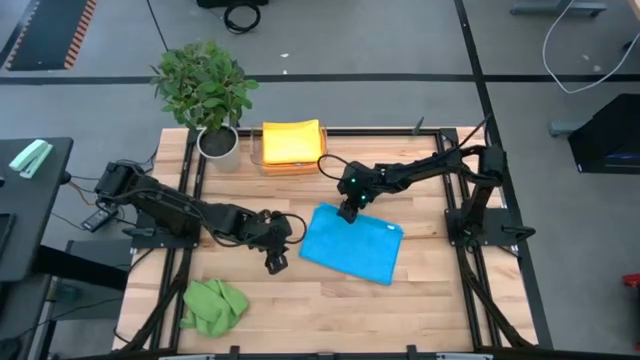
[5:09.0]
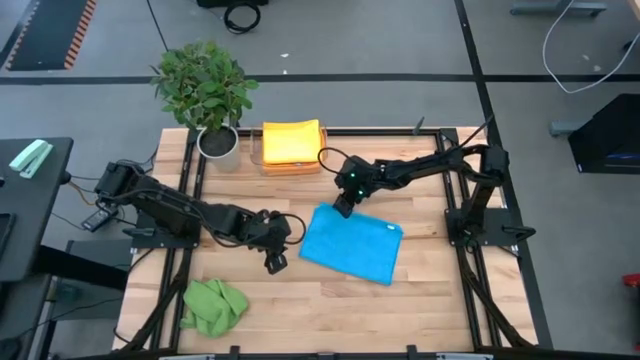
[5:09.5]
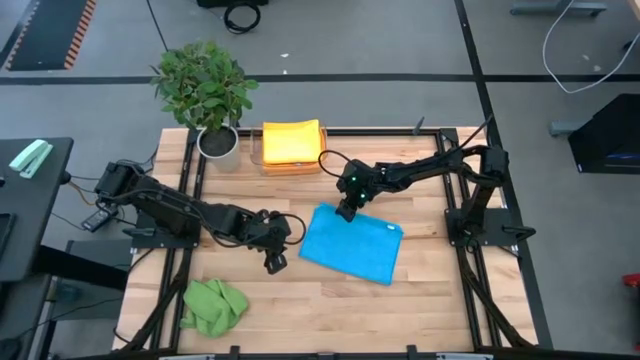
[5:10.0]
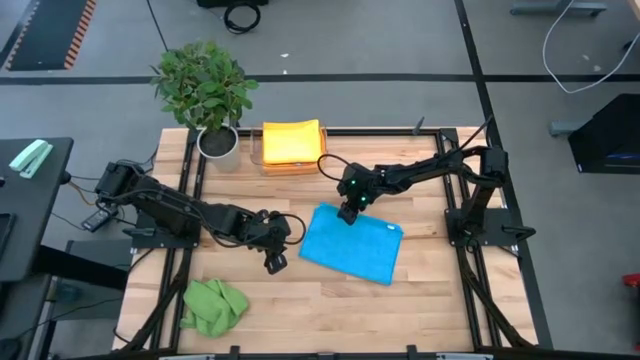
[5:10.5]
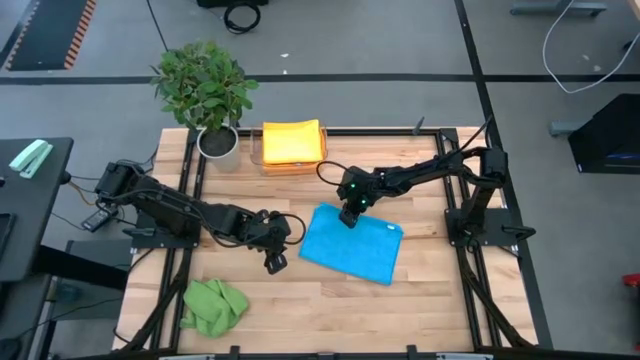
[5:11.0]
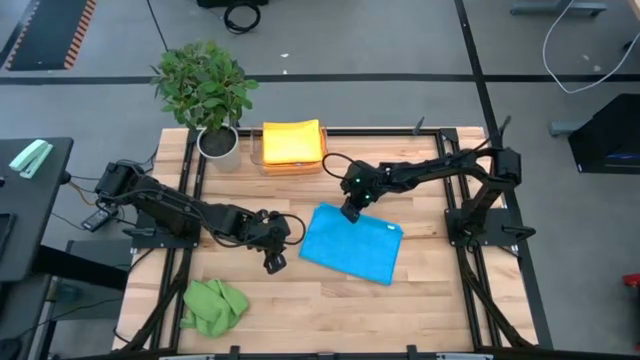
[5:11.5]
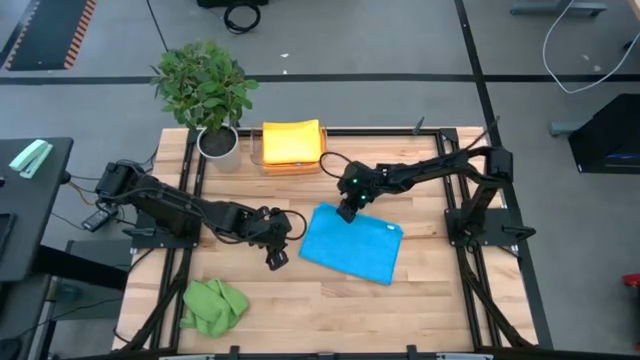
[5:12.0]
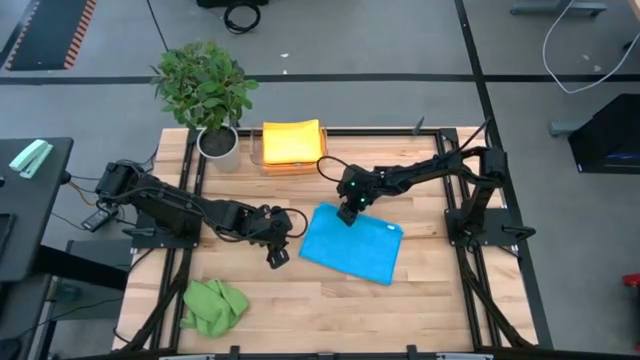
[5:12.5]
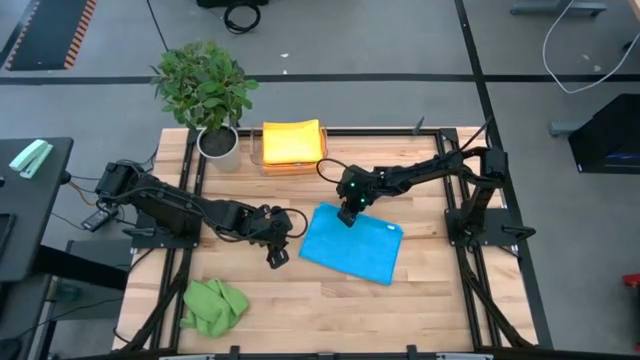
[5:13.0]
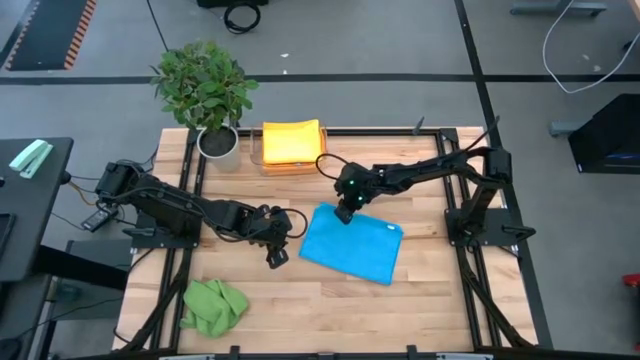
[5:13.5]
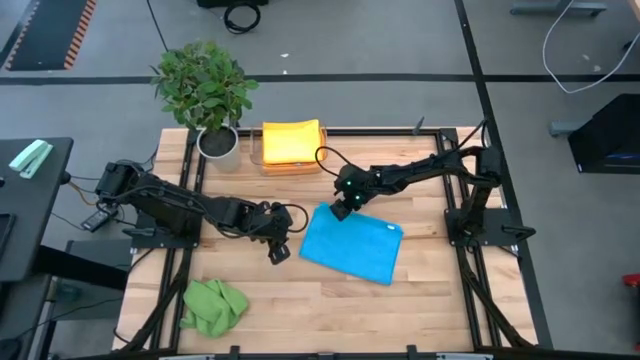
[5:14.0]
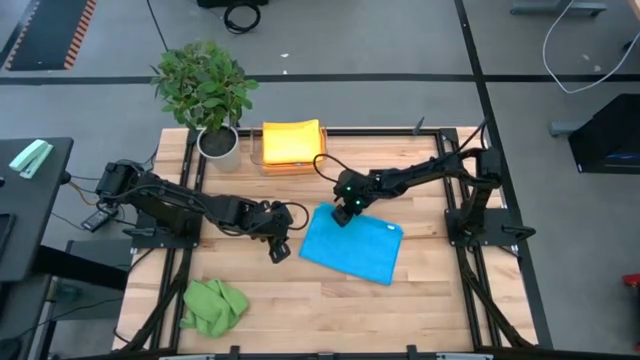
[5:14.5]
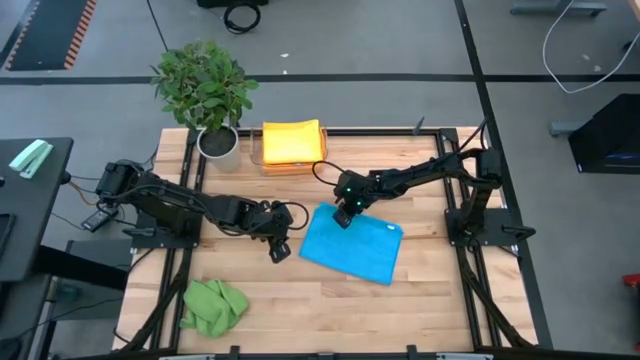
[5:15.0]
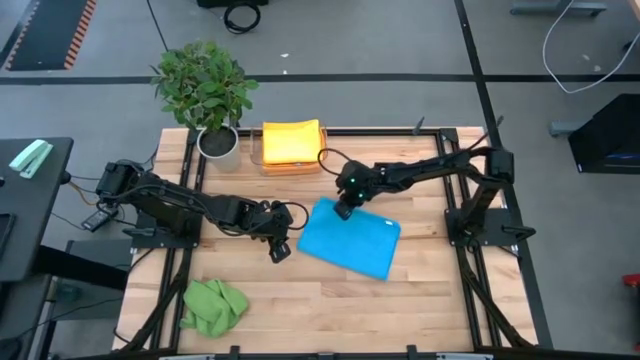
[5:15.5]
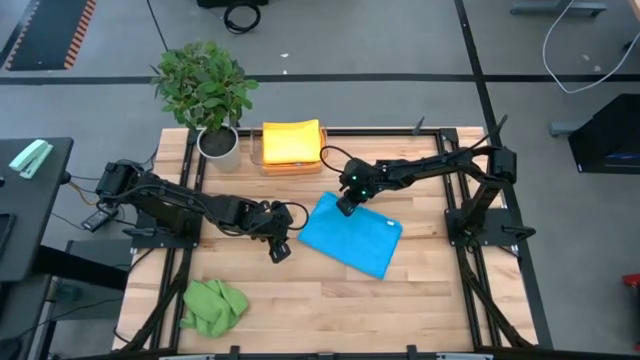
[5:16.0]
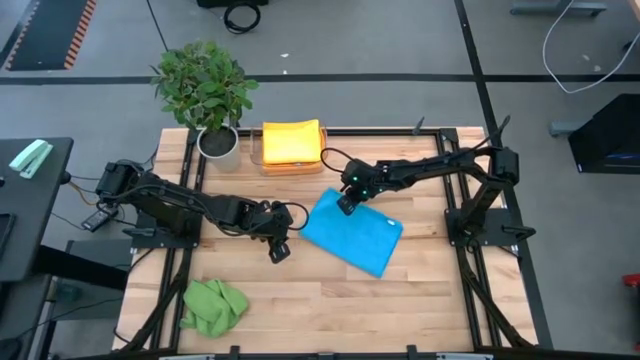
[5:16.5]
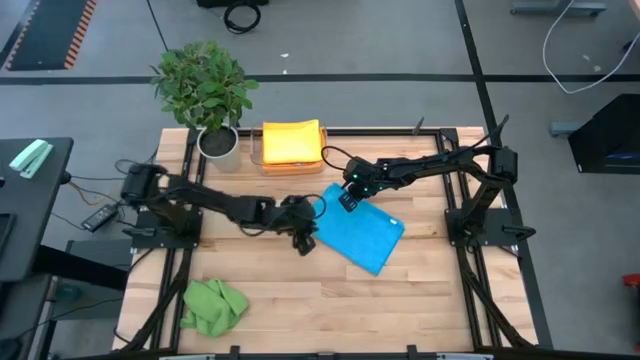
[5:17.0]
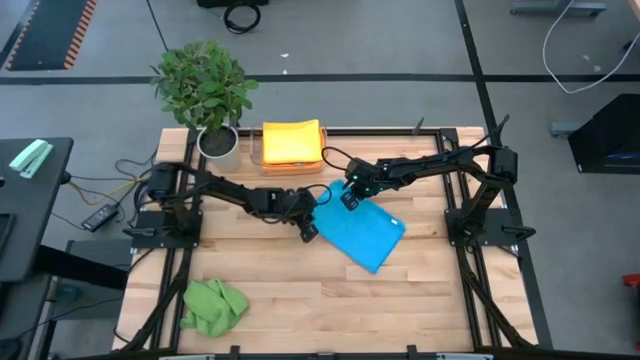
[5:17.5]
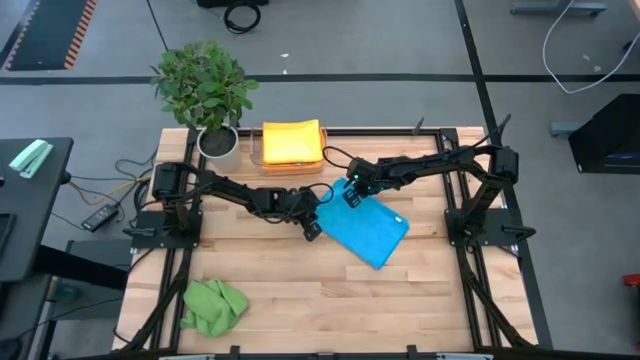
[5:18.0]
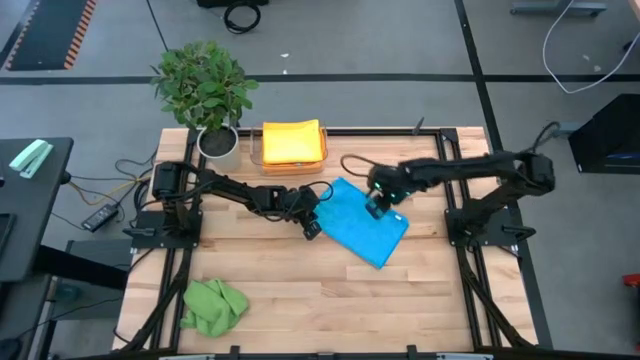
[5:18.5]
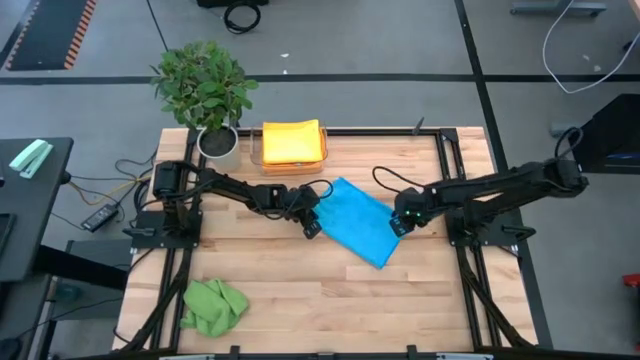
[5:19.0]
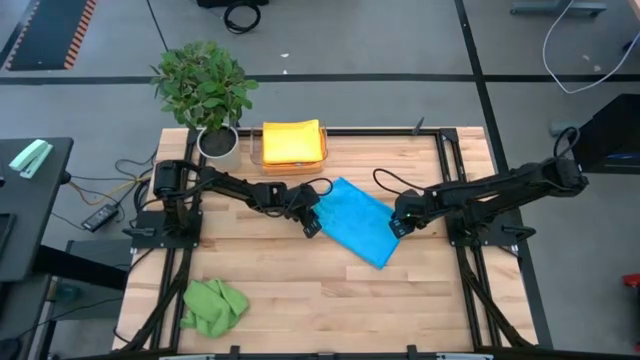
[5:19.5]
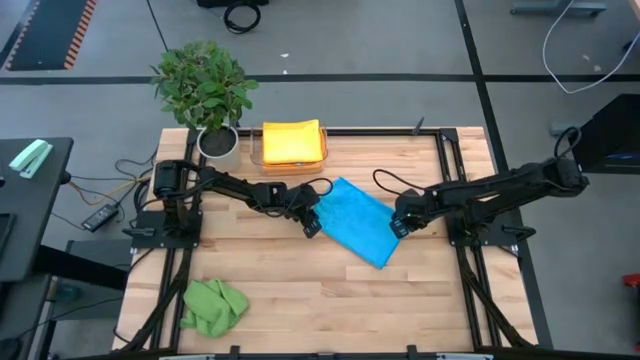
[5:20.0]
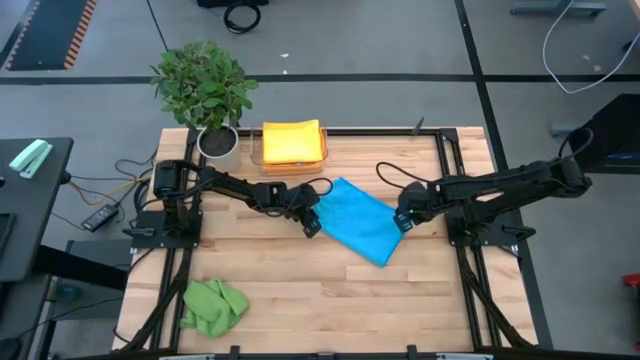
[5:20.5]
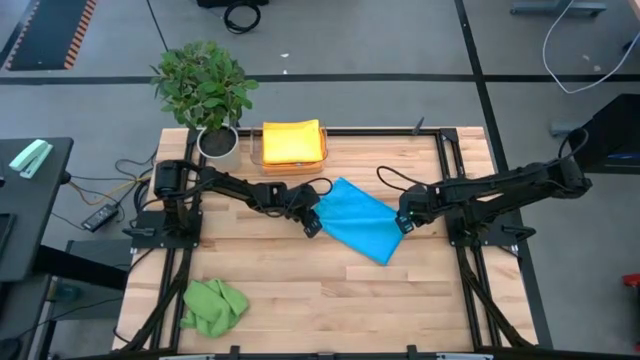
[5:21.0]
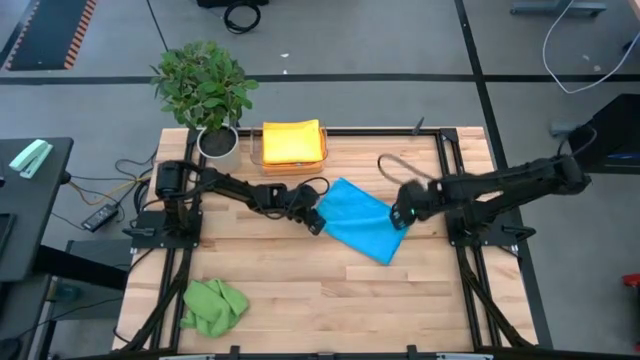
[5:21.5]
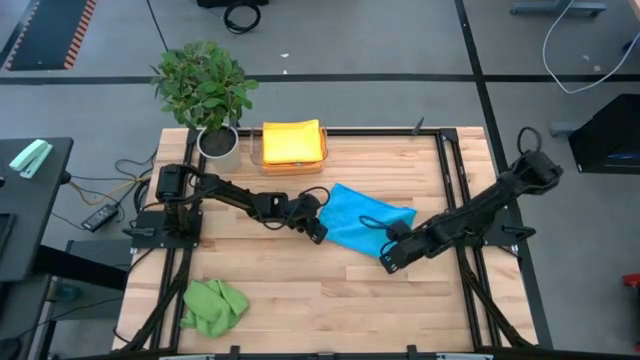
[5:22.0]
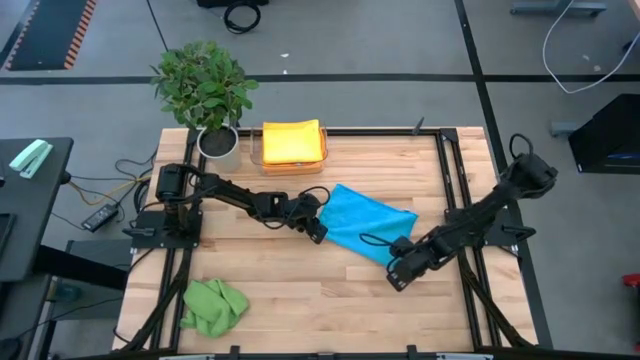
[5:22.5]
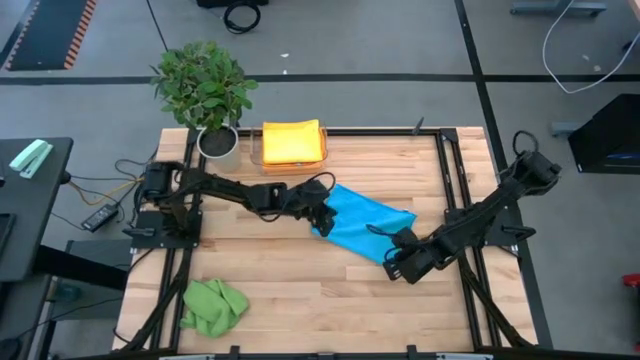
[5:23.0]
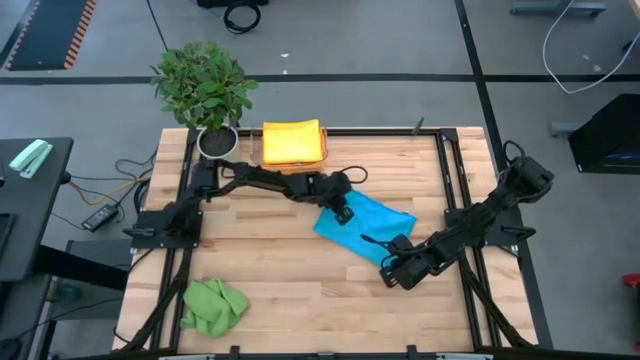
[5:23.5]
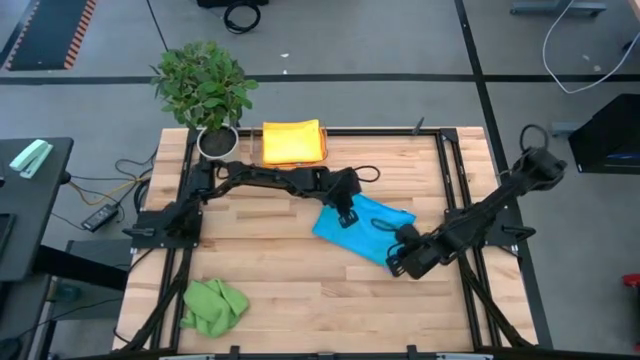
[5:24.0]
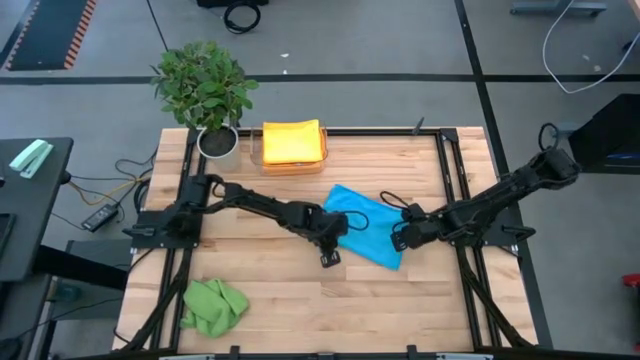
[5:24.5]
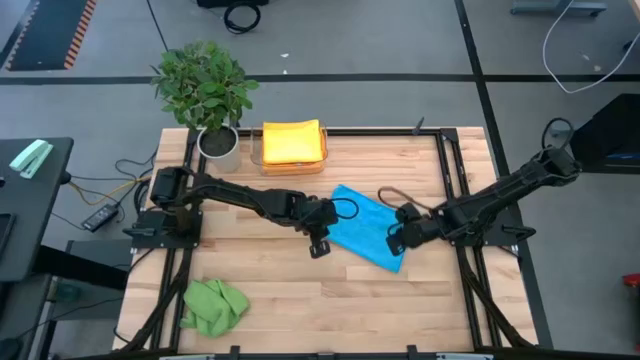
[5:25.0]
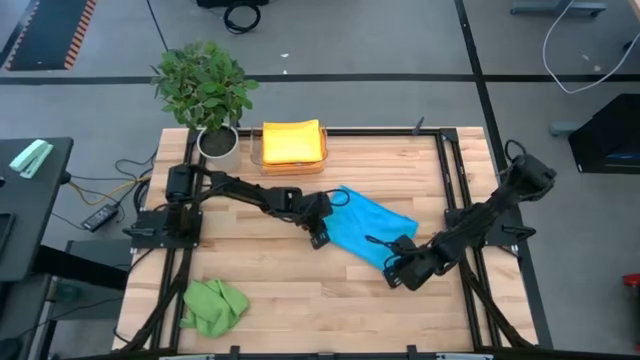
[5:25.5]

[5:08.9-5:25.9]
Task: Fold microfiber towels
Fold the blue microfiber cloth

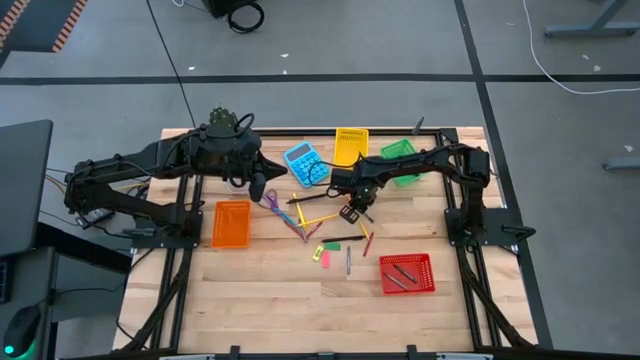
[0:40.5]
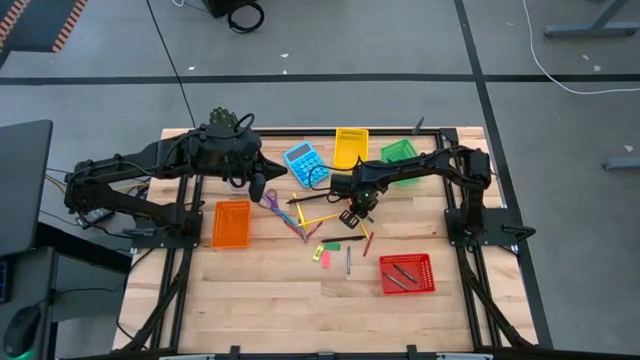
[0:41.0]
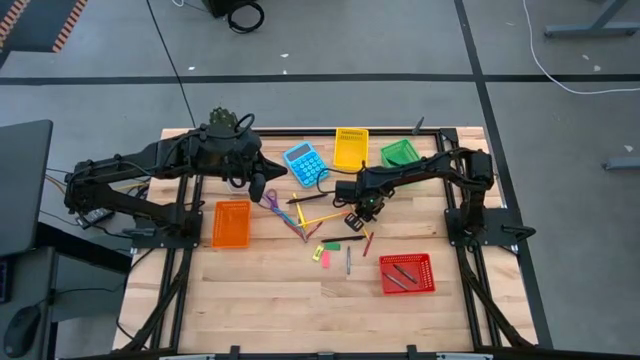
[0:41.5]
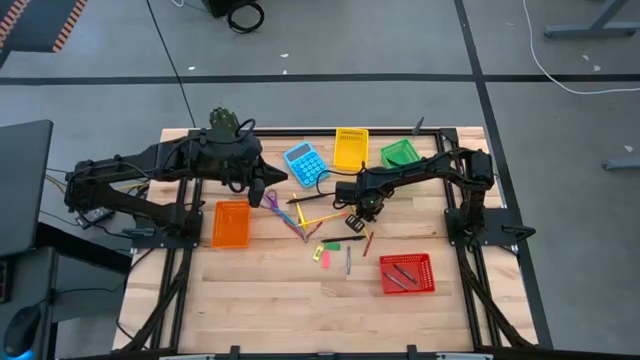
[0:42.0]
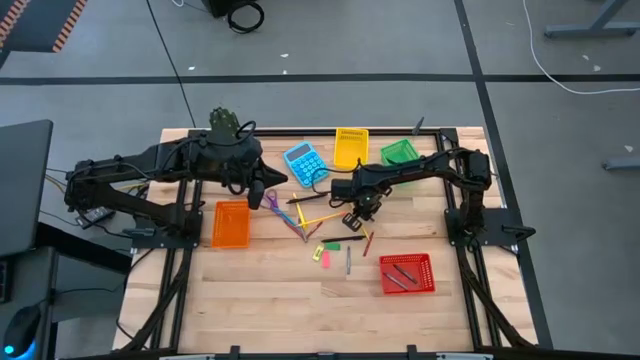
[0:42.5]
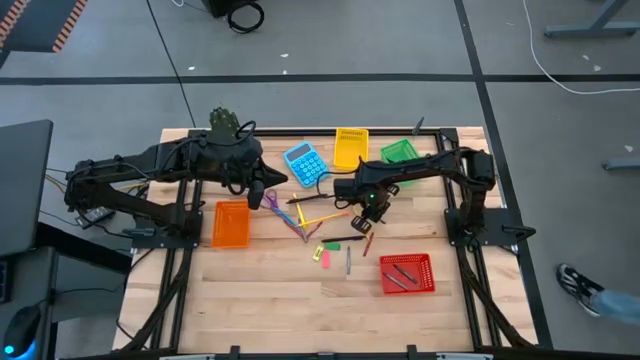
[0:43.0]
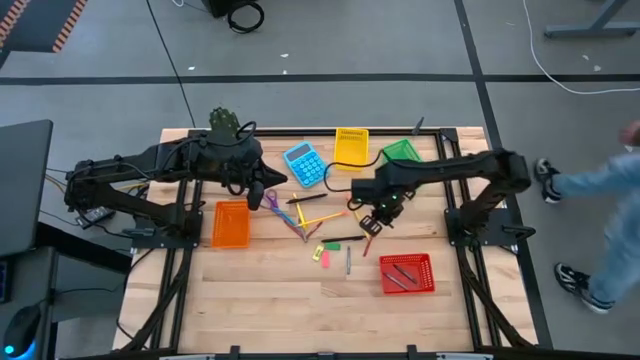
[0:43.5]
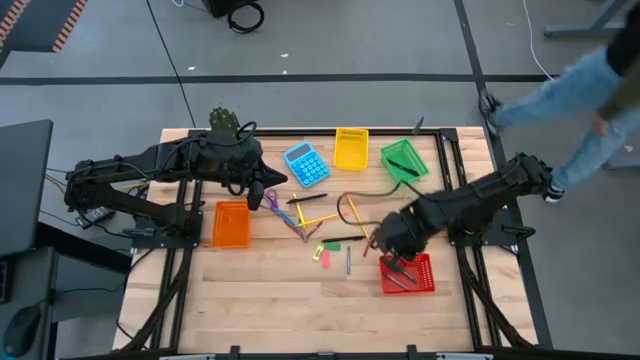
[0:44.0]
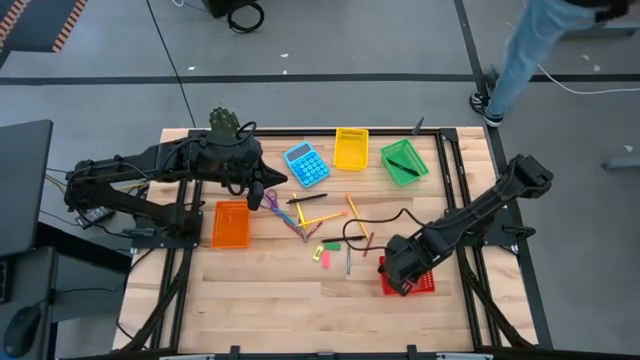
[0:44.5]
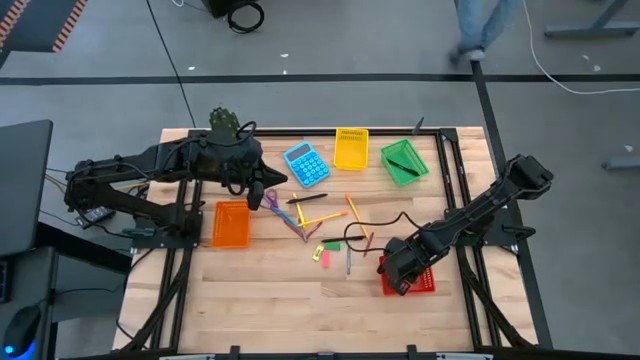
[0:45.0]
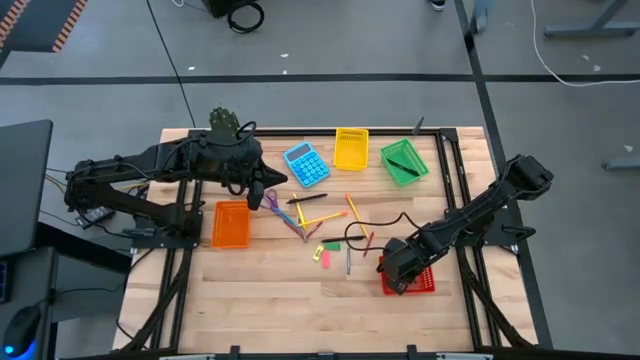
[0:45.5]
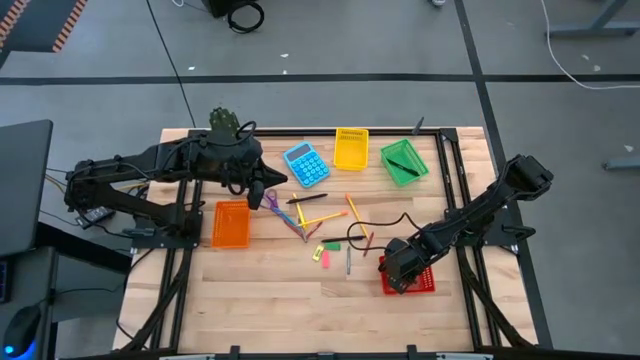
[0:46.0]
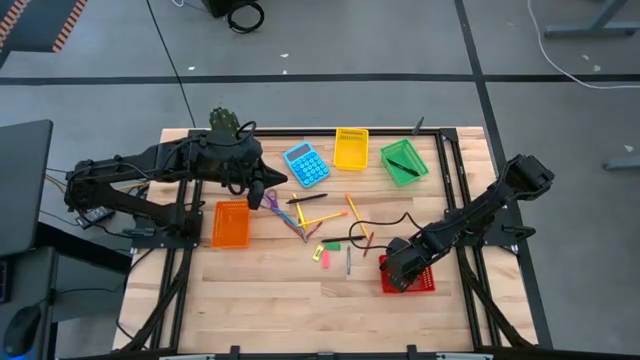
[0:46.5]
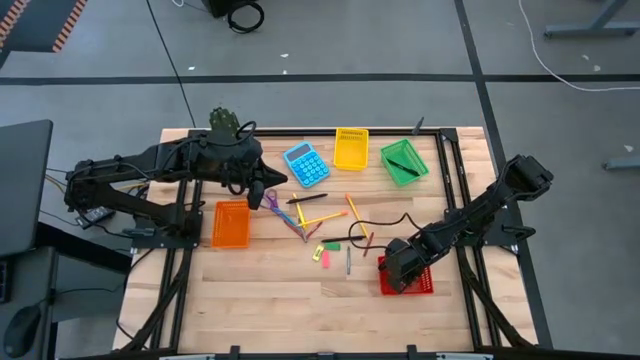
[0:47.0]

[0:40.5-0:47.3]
Task: Sort crayons/erasers/pens/pencils in bins
Put the green crayon into the red bin
